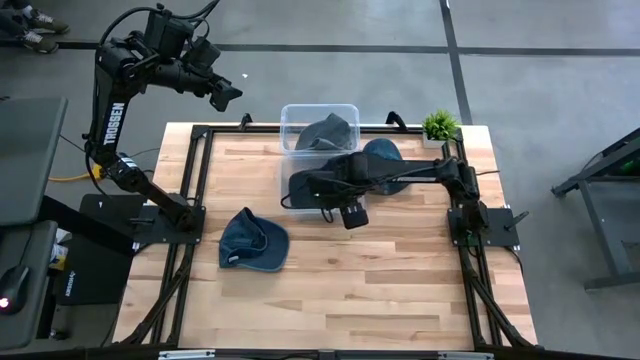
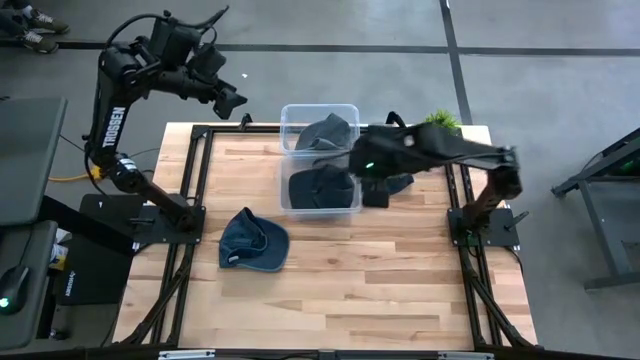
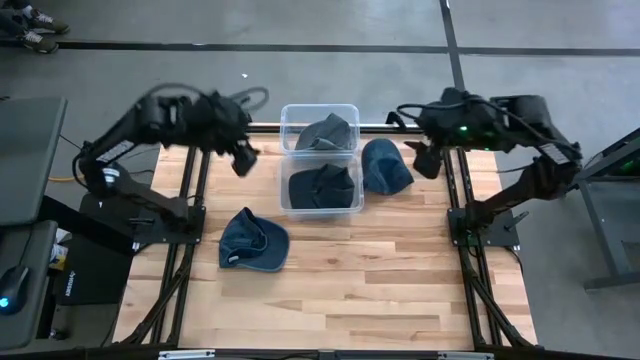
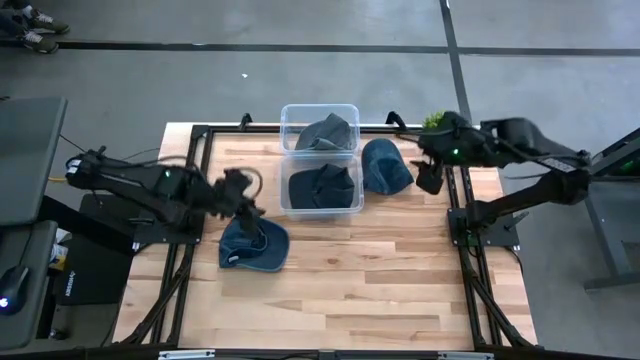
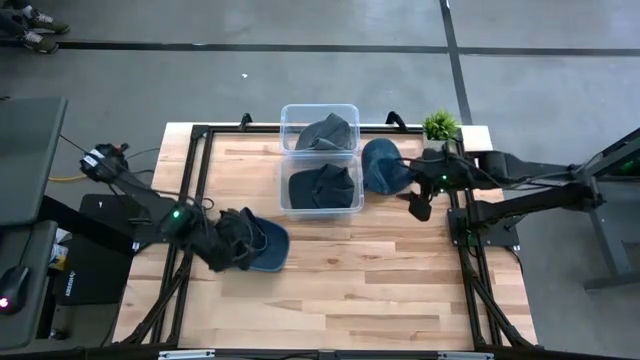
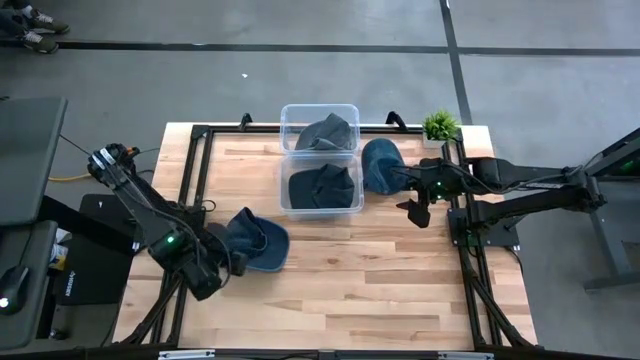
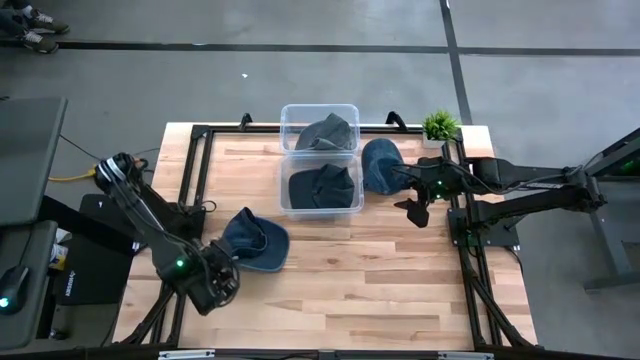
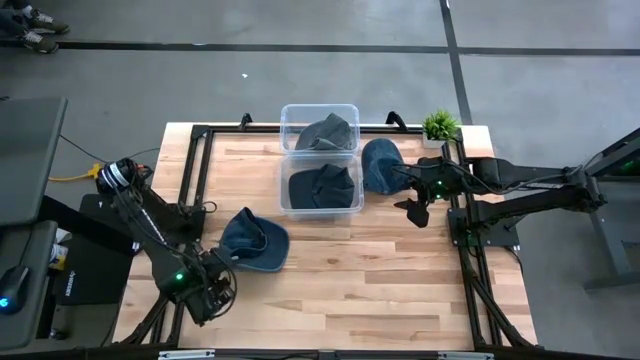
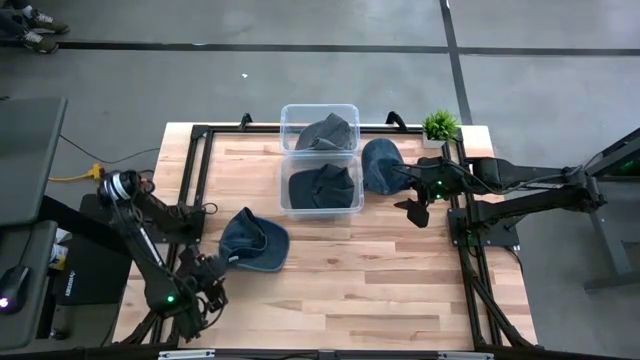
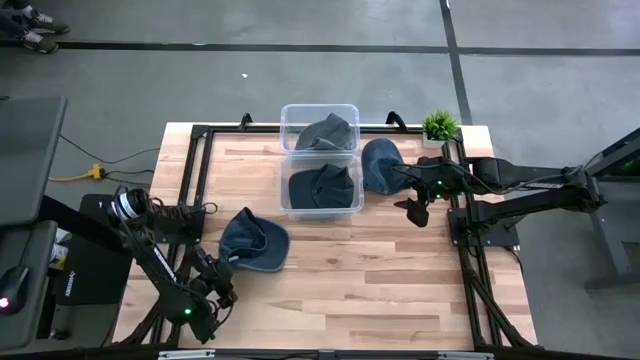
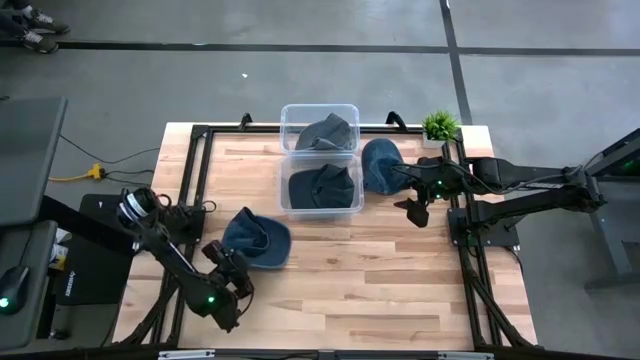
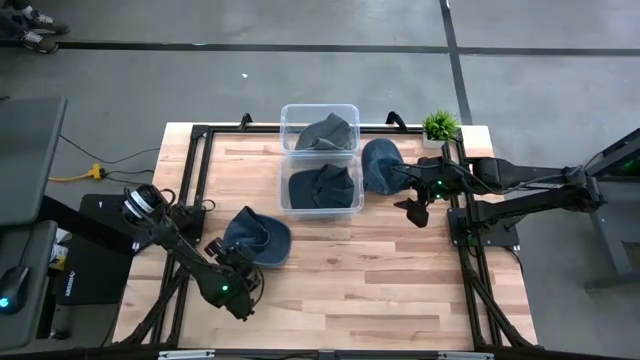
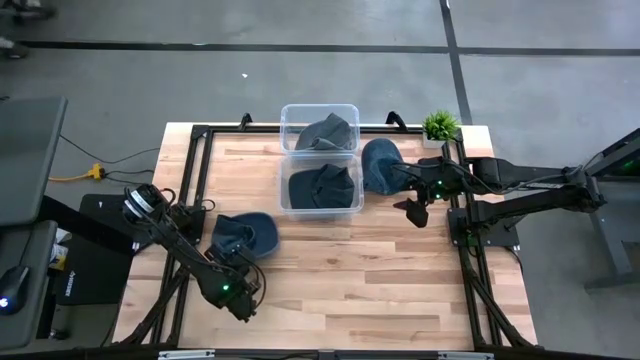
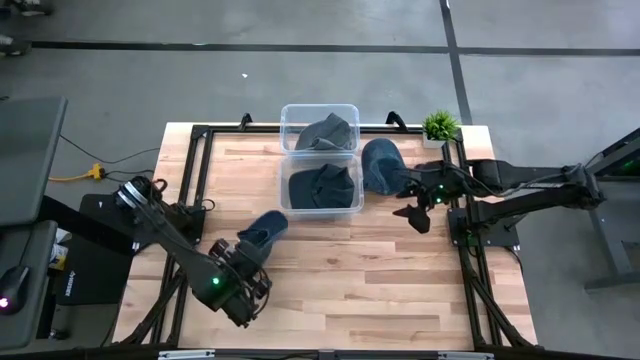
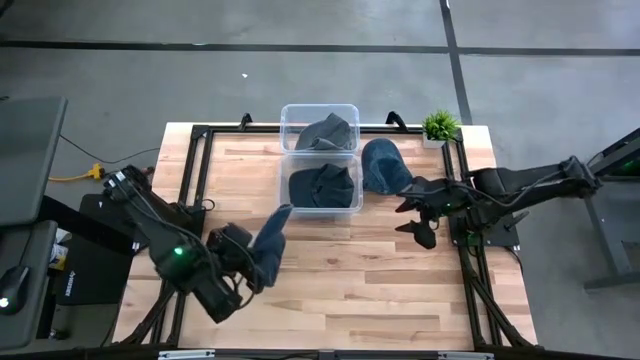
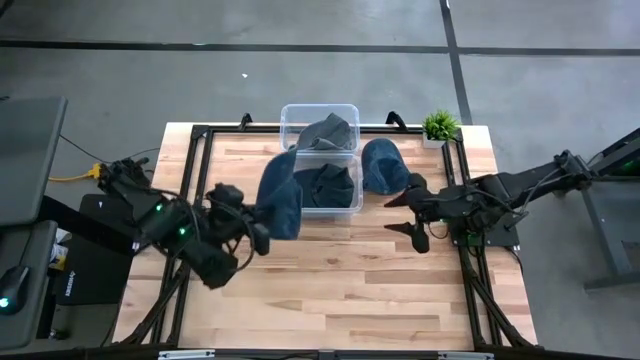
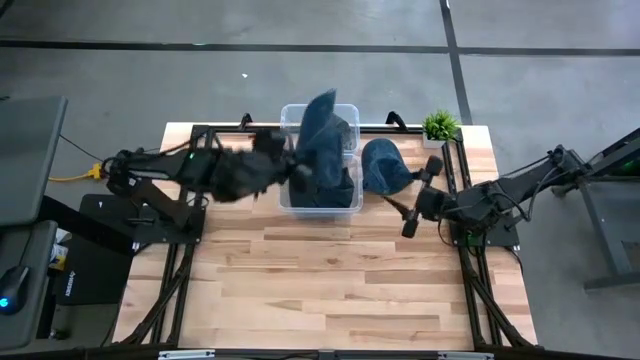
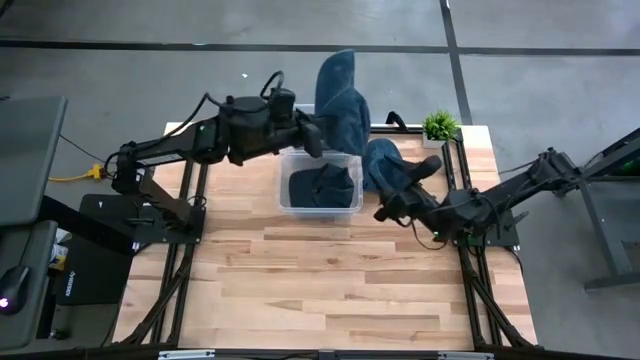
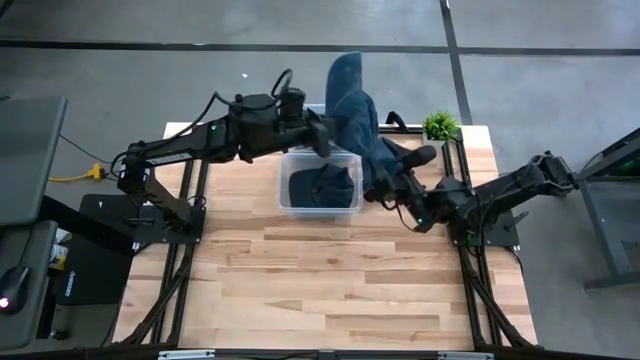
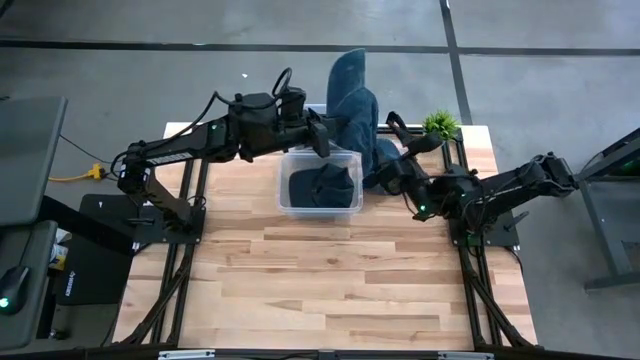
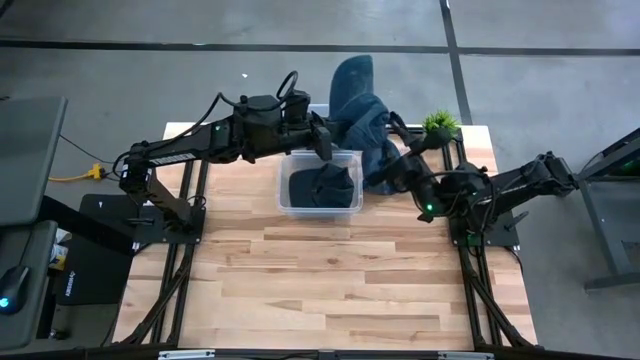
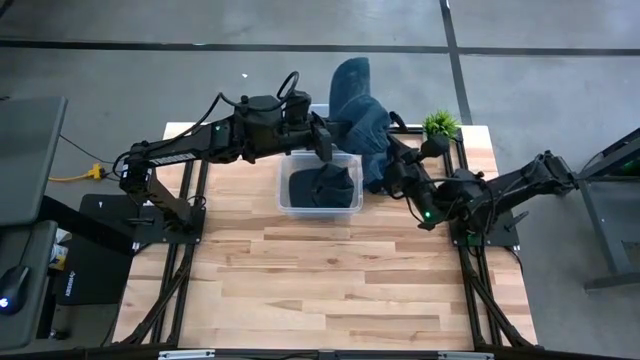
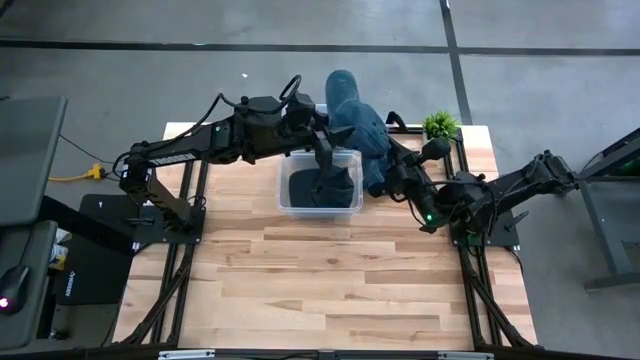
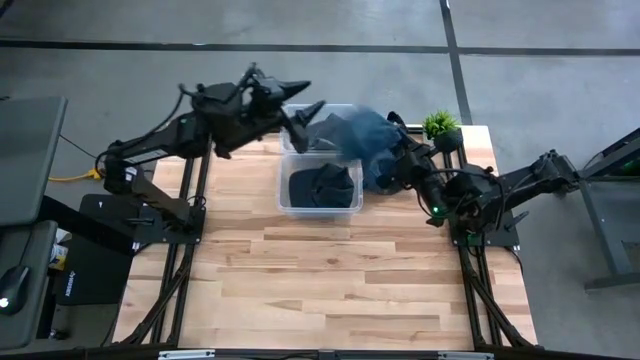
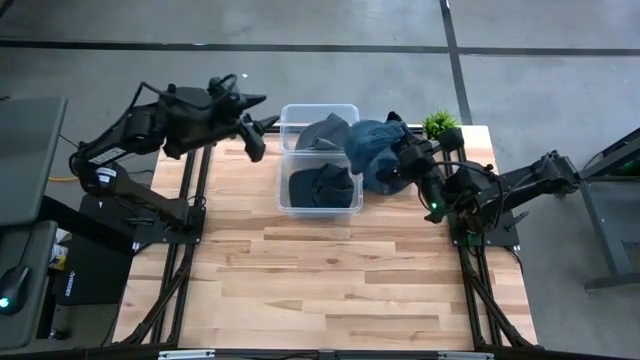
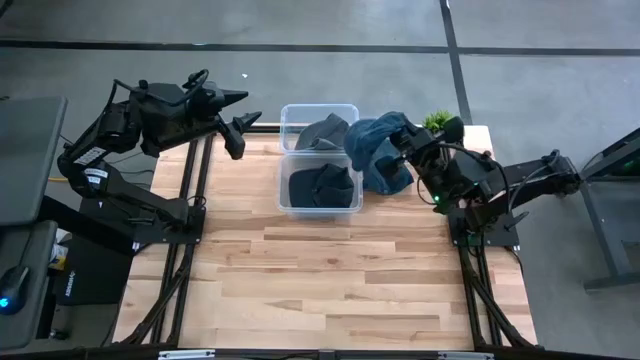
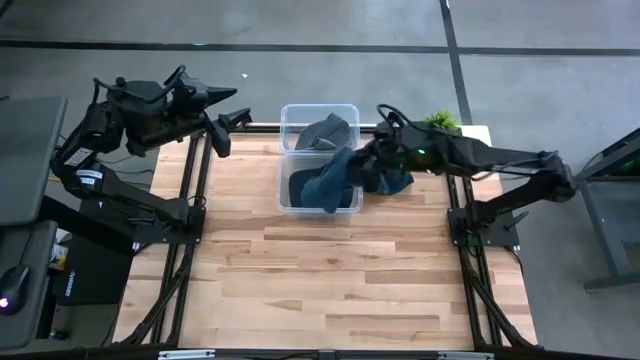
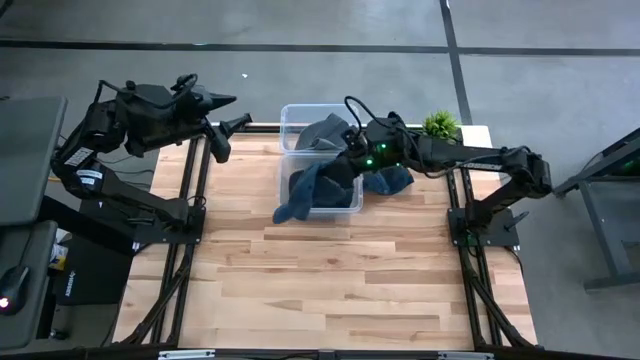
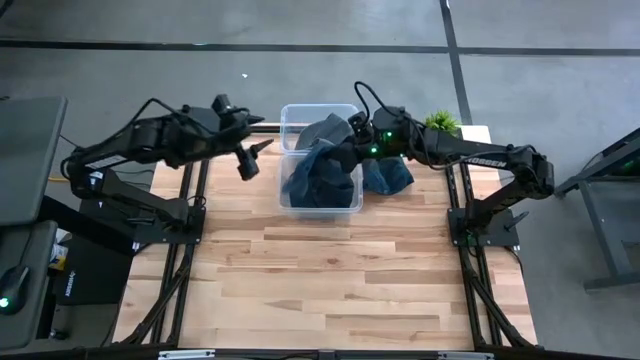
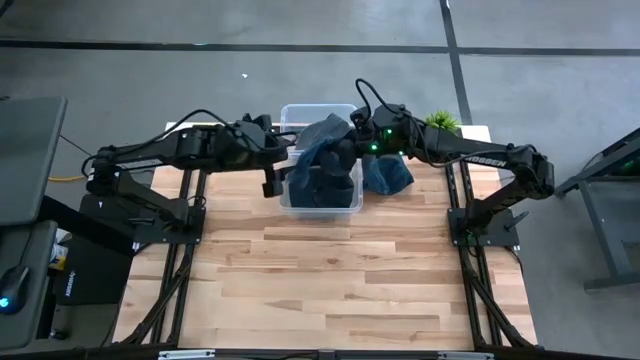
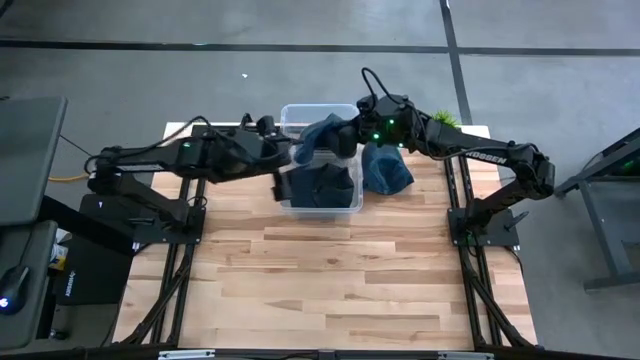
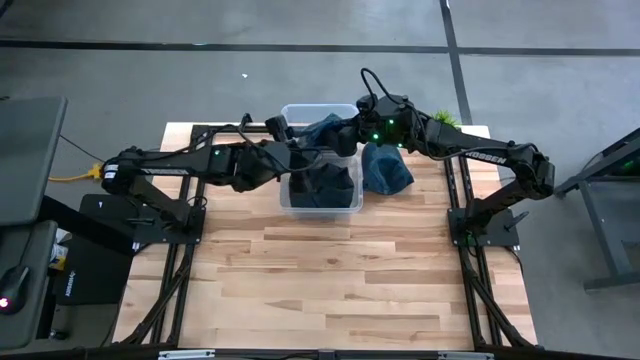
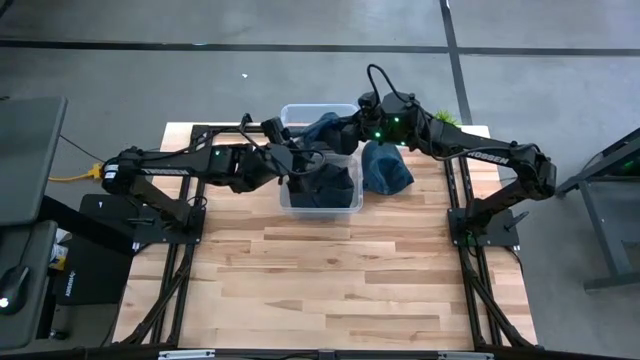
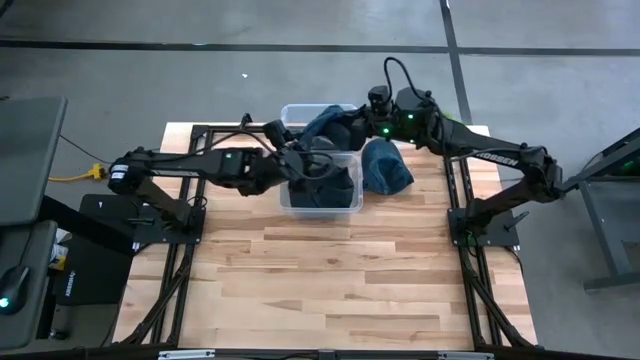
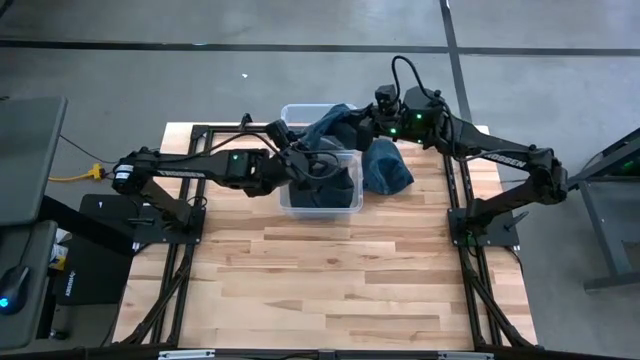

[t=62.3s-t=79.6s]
Task: Pick & Place hat
Put the bottom dark blue cap into the bottom transparent bin

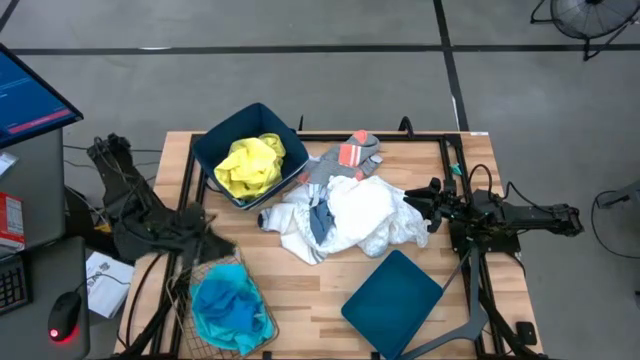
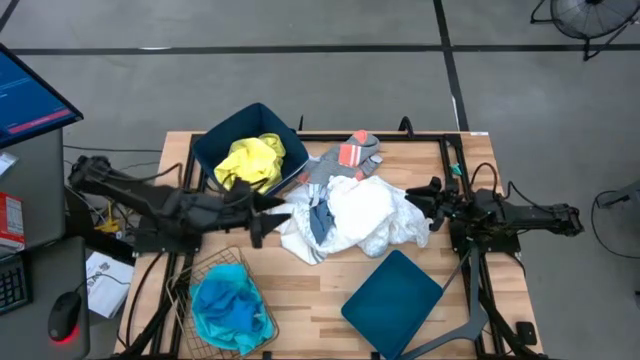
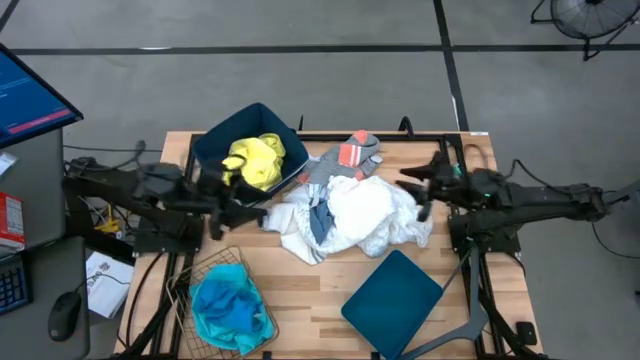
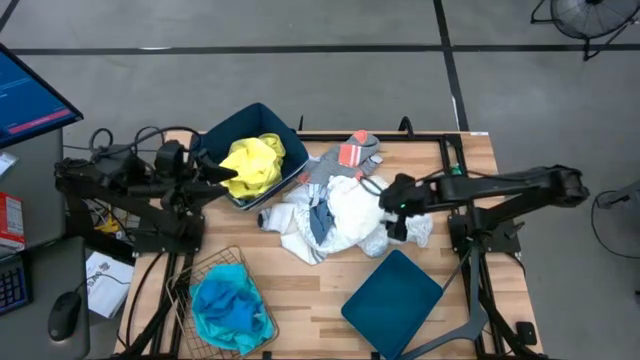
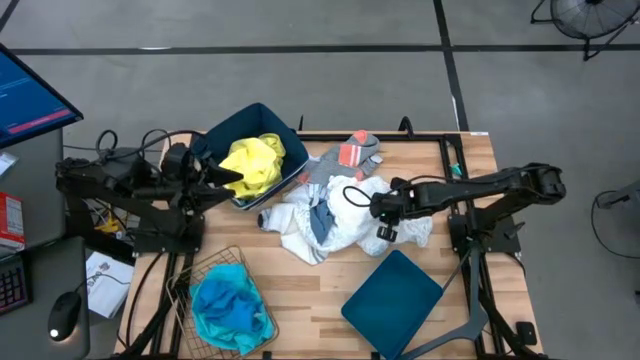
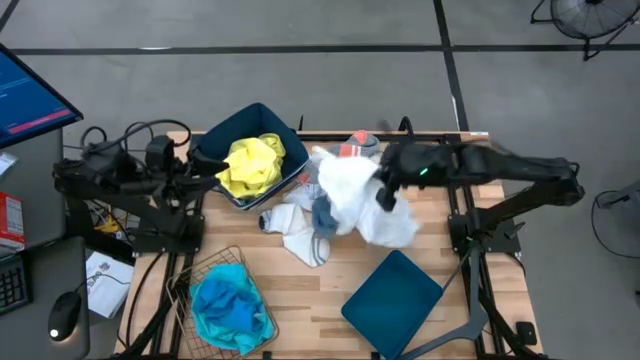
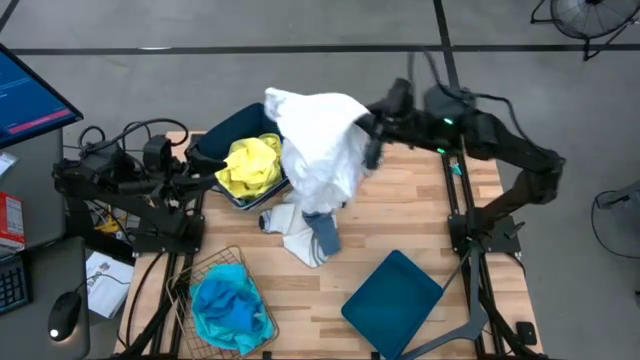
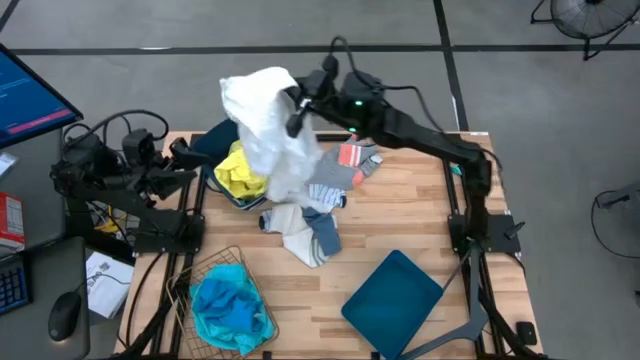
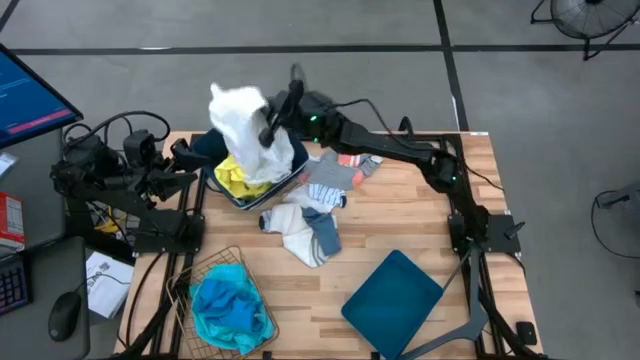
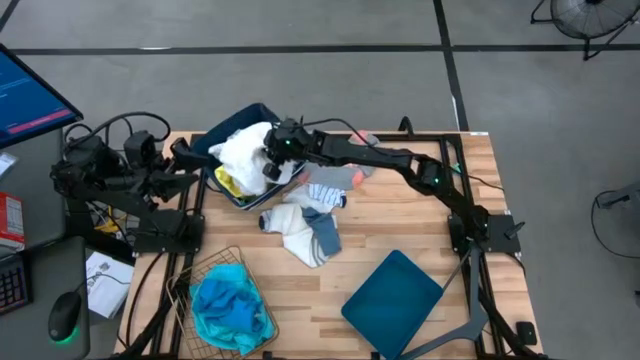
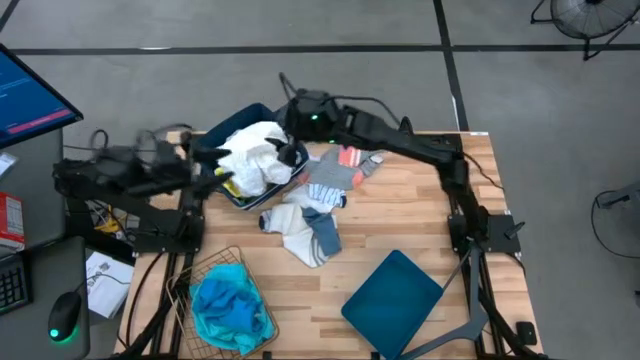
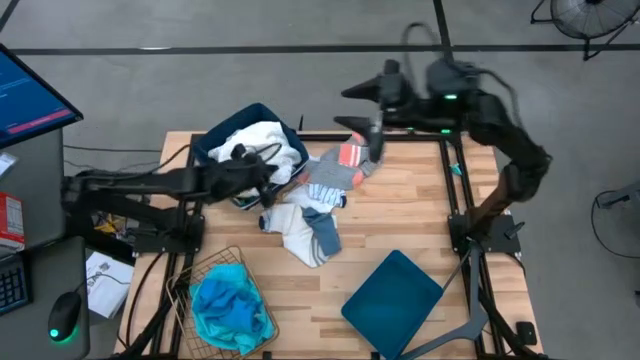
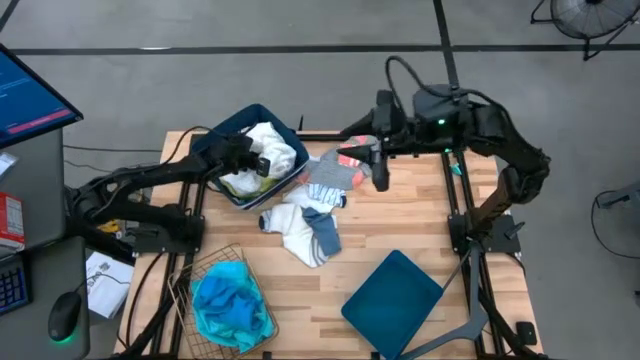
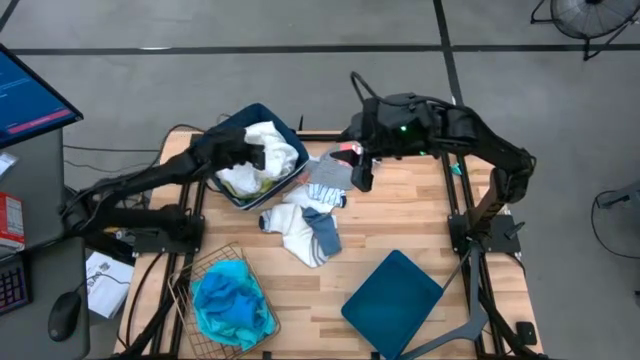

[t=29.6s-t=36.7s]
Task: Pick & Place Cloths
Put the white shirt into the blue laundry organizer
